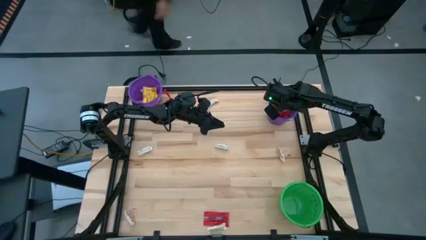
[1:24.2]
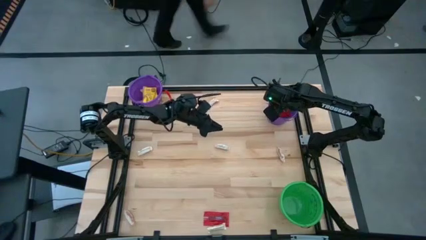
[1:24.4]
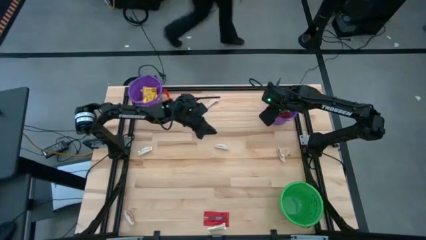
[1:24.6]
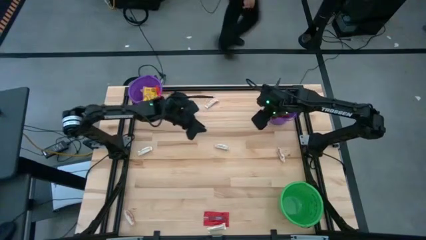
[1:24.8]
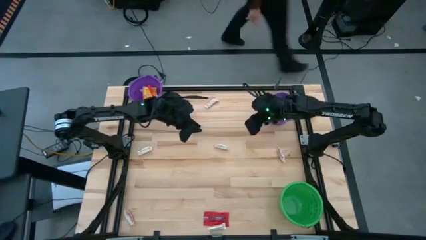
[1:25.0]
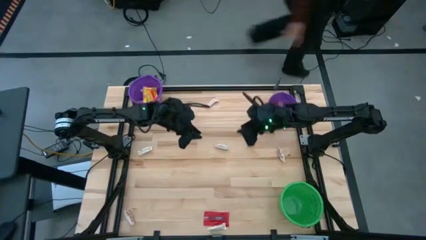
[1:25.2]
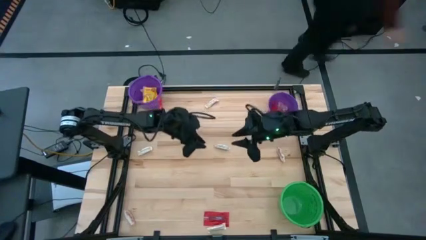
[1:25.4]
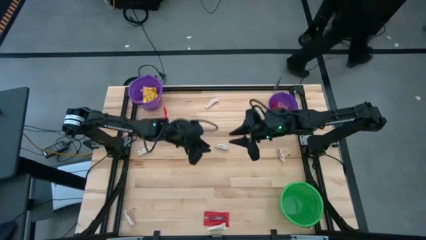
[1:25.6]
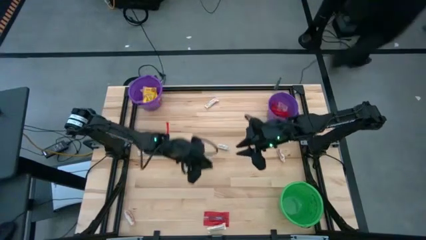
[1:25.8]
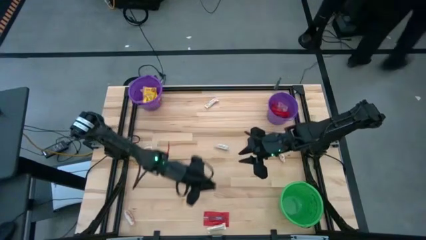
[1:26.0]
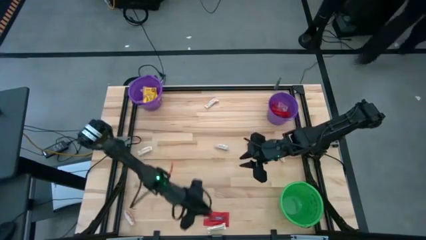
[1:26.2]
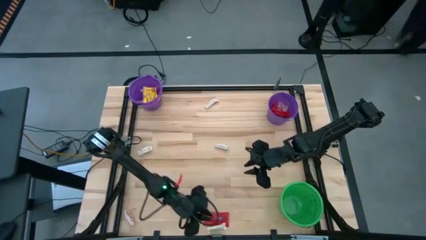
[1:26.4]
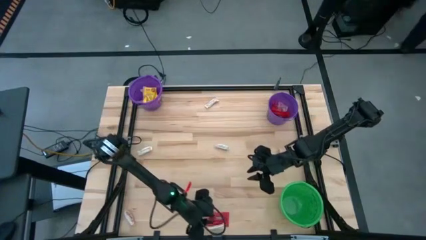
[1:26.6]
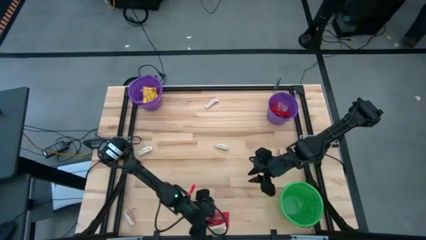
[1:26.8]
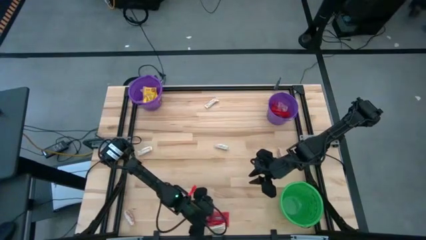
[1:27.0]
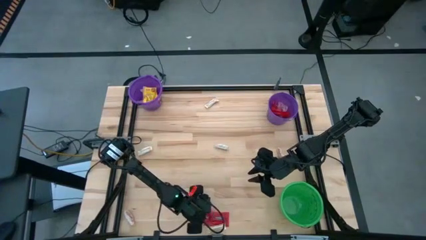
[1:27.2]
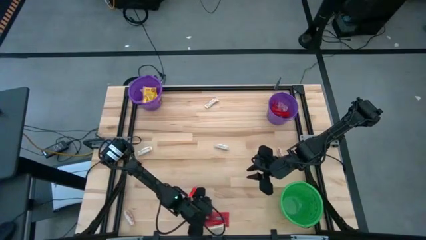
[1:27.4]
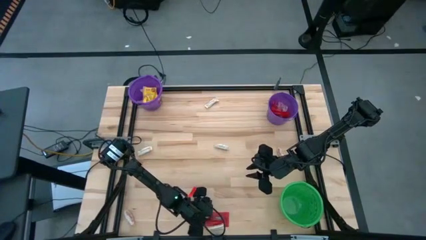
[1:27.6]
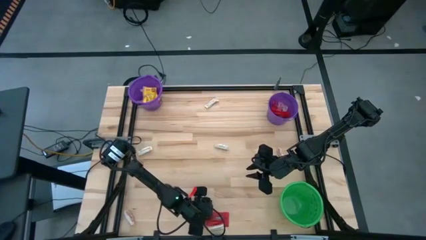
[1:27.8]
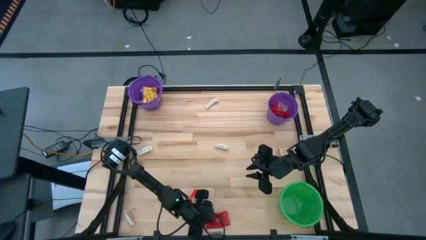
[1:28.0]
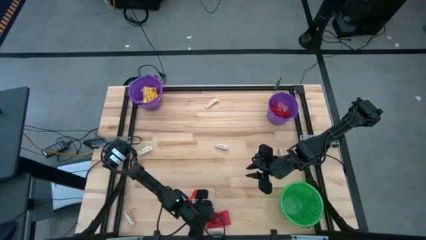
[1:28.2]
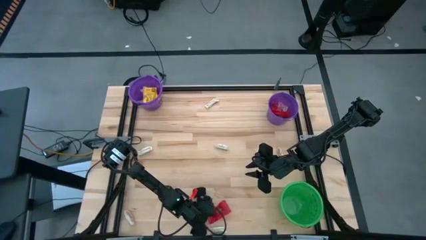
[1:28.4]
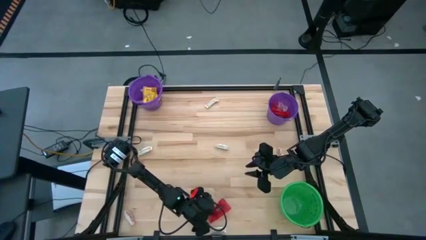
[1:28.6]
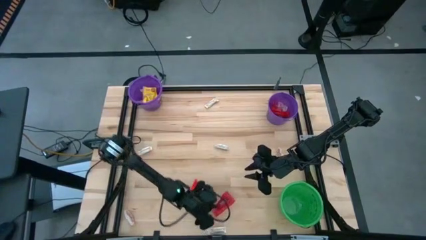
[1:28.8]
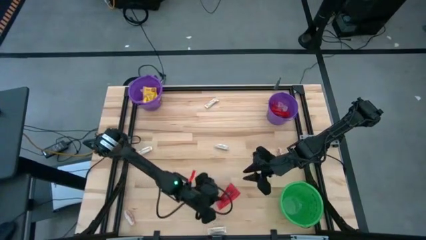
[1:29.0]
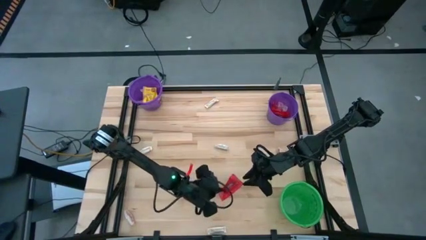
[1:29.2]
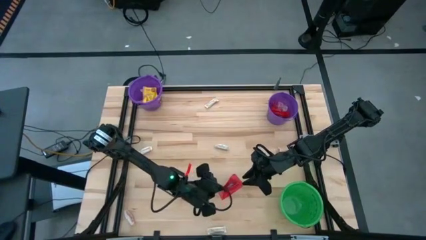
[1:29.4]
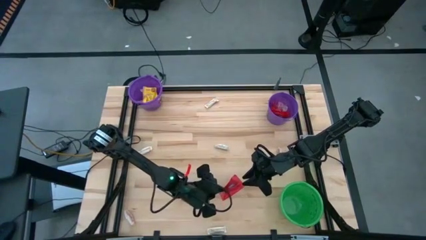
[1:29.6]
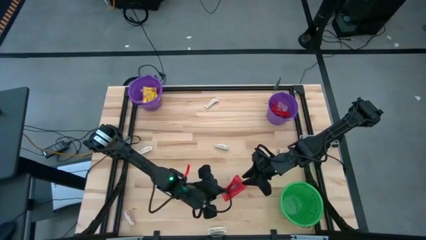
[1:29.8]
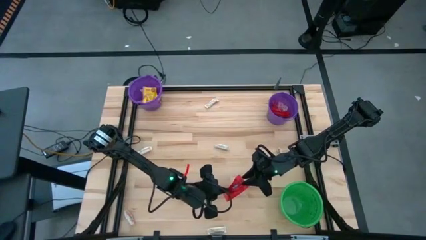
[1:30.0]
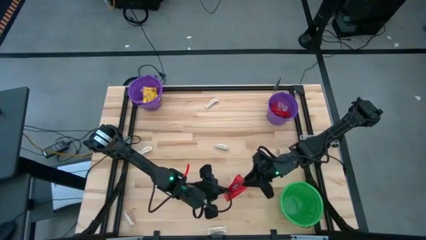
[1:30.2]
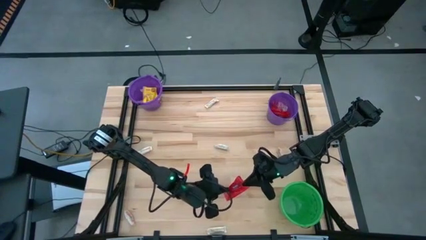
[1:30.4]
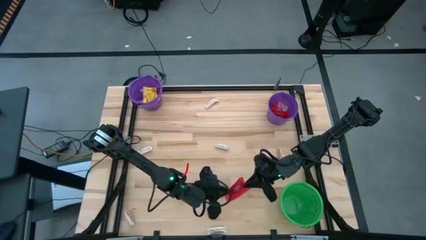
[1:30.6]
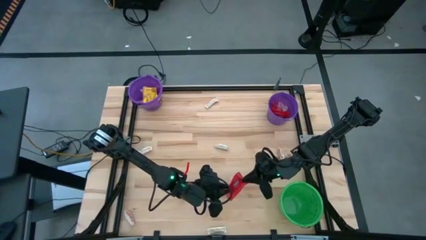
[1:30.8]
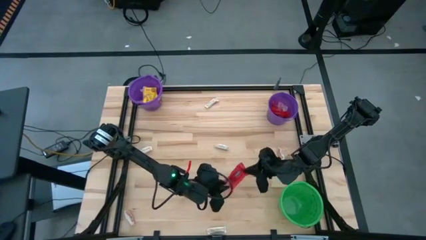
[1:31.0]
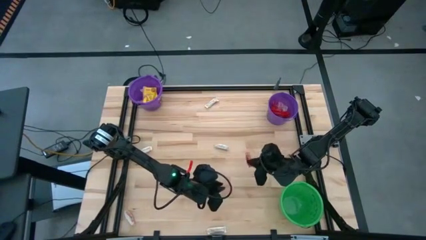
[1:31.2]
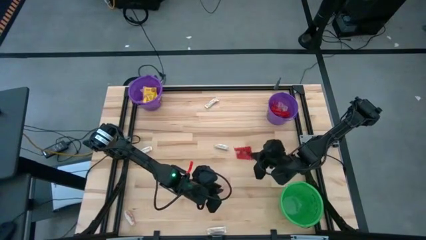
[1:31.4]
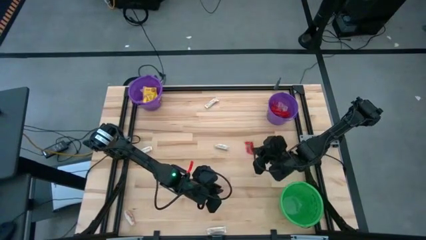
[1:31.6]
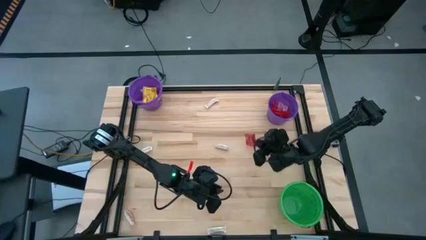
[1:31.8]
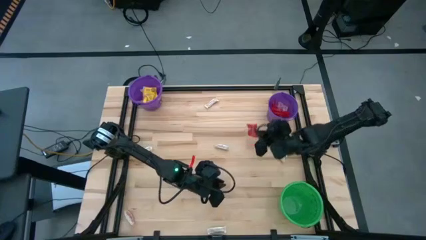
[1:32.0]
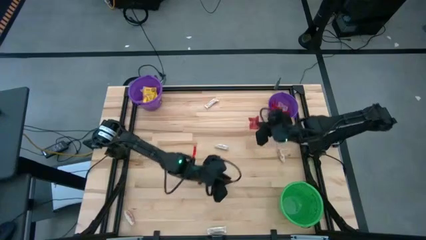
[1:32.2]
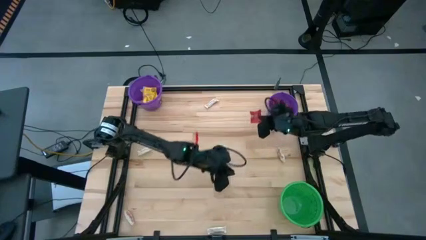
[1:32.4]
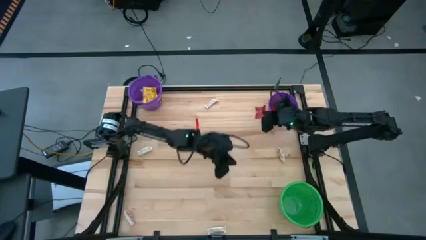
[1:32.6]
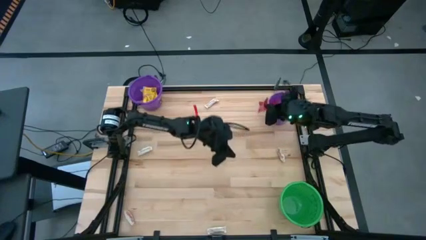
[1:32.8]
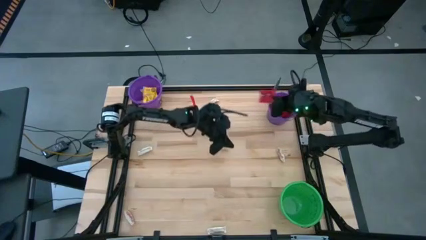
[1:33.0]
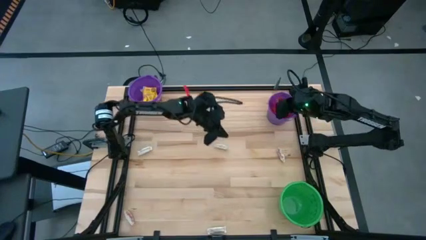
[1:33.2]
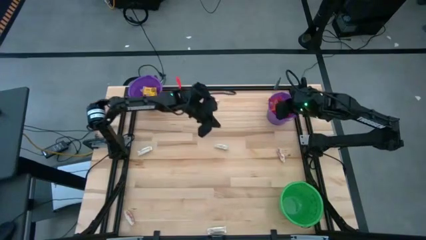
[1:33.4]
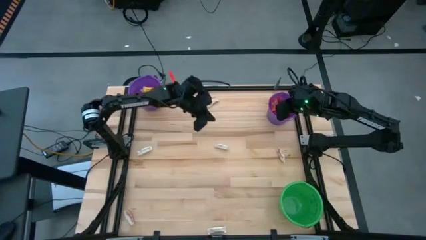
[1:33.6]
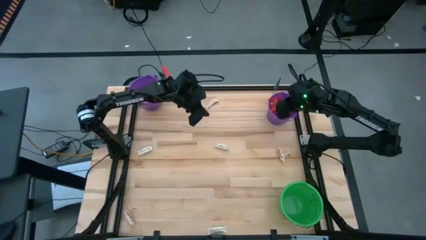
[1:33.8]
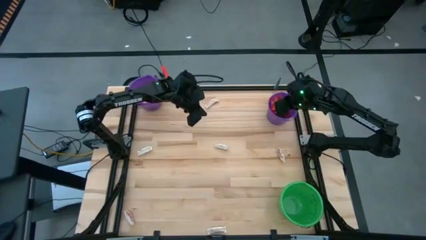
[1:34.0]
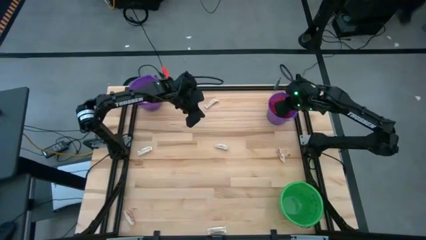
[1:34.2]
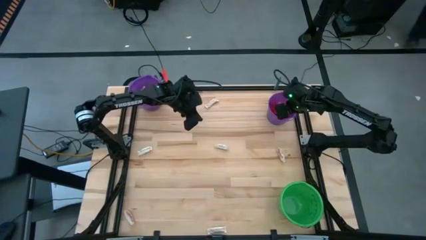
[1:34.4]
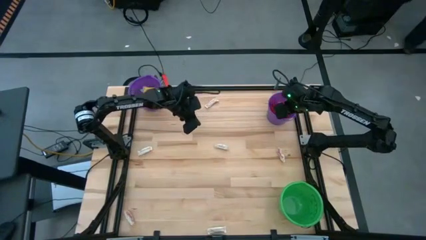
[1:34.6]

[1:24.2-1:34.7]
Task: Sort candy by brand, put in halloween buckets
Put the red candy into the right purple bucket

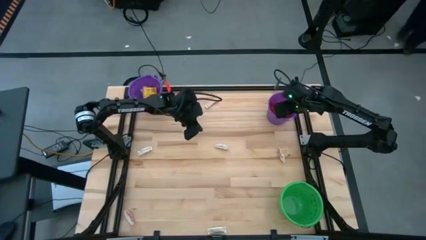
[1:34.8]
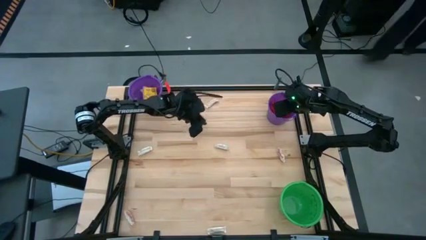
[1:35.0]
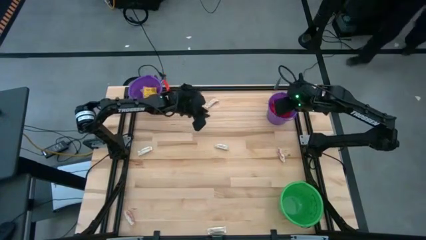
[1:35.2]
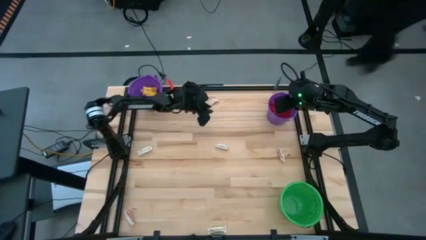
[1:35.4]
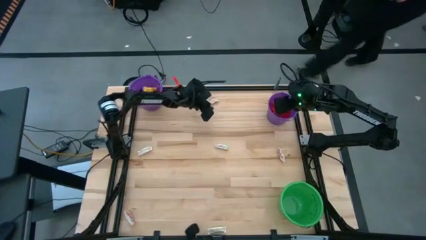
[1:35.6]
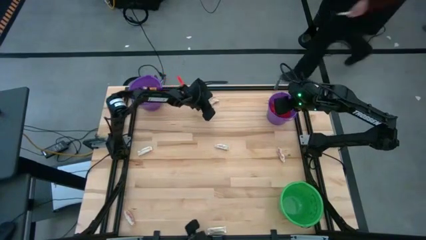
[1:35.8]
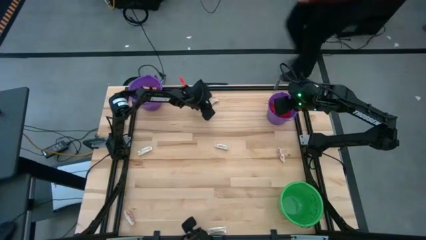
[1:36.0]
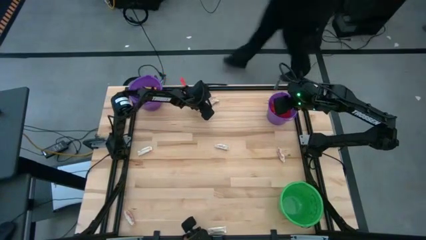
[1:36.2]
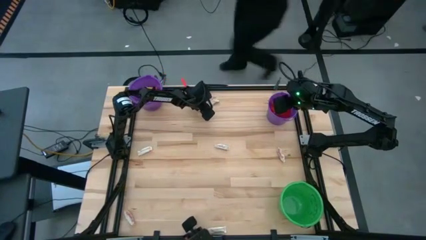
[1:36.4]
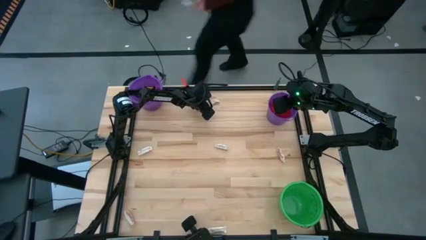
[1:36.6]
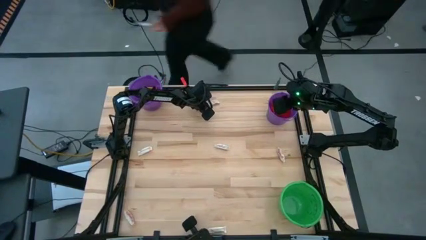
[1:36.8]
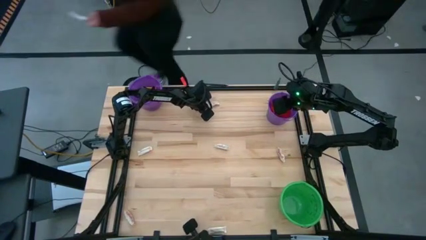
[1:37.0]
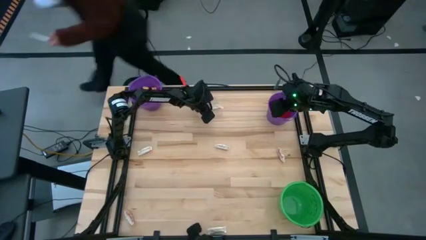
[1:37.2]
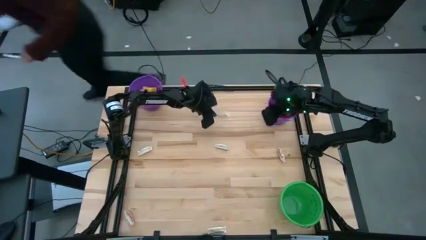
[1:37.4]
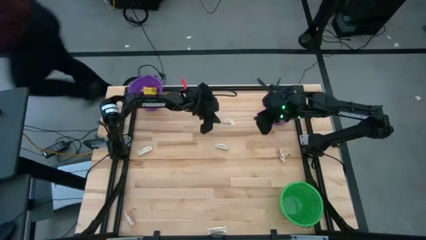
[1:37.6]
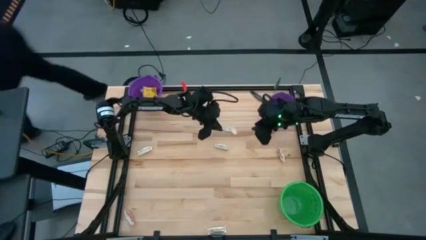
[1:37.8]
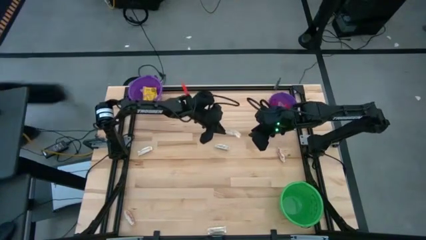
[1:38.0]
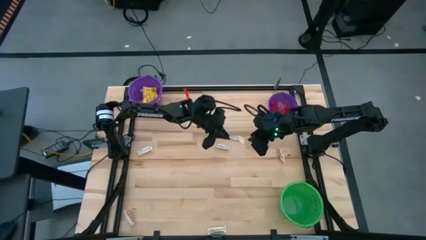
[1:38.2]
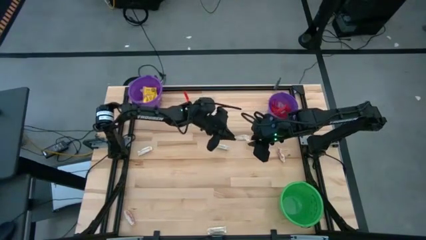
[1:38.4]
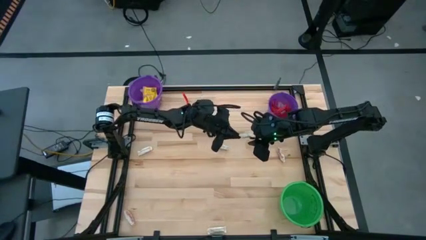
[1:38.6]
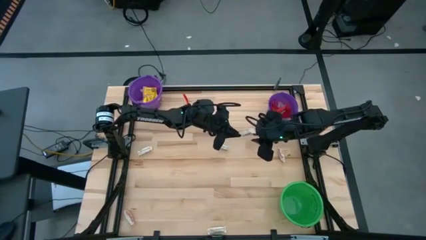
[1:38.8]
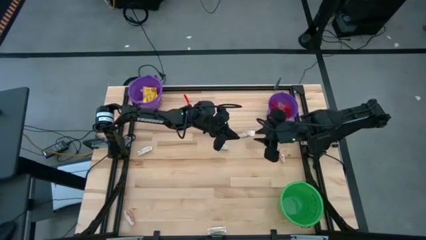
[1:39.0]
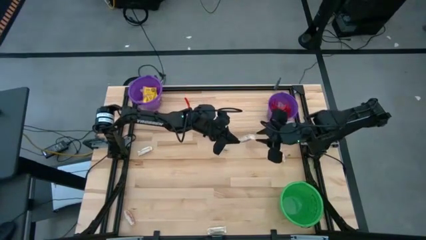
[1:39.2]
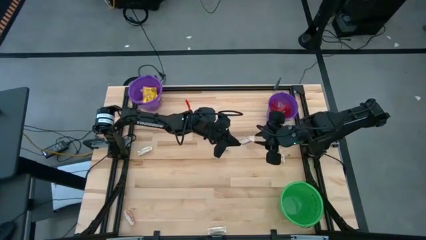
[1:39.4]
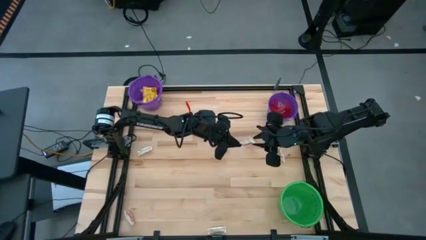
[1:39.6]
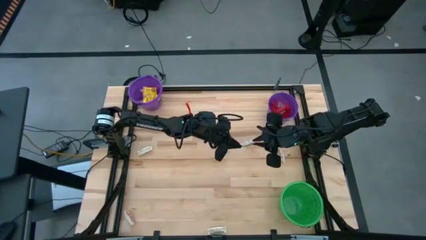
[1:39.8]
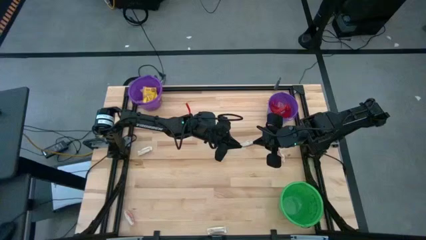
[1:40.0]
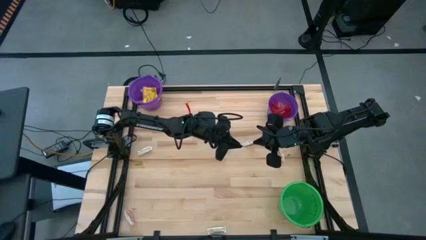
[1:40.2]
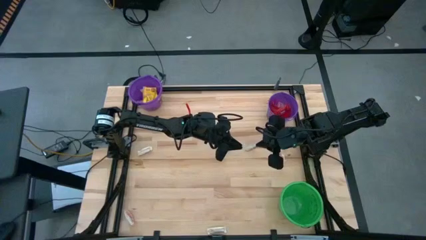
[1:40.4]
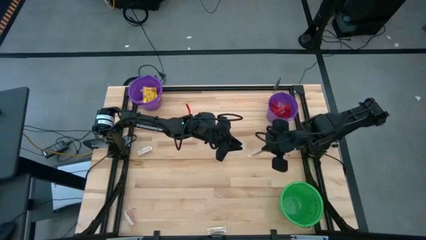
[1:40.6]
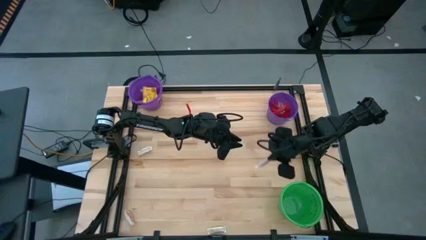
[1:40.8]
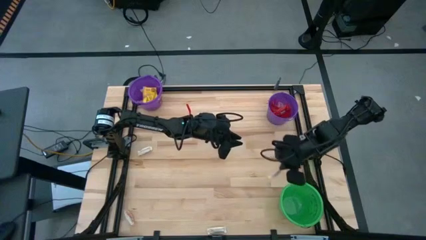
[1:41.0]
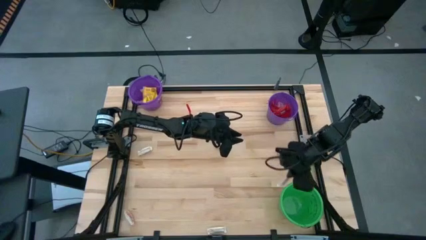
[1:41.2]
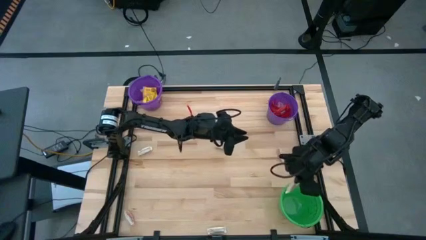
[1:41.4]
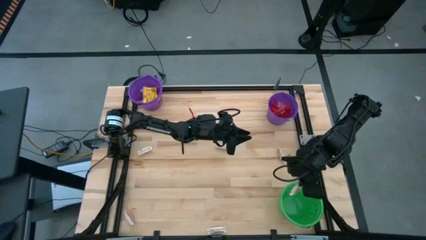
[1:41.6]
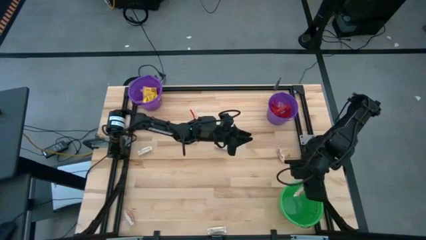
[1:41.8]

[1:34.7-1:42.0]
Put the white chocolate bar into the green bucket
